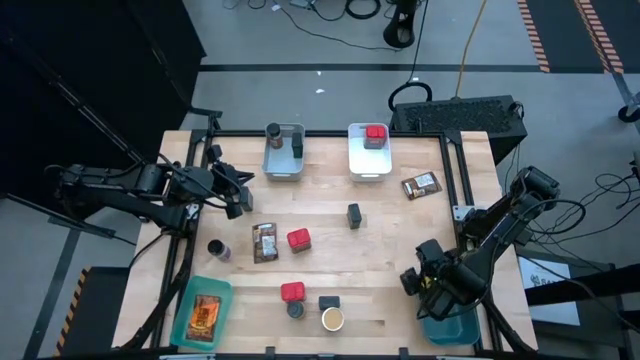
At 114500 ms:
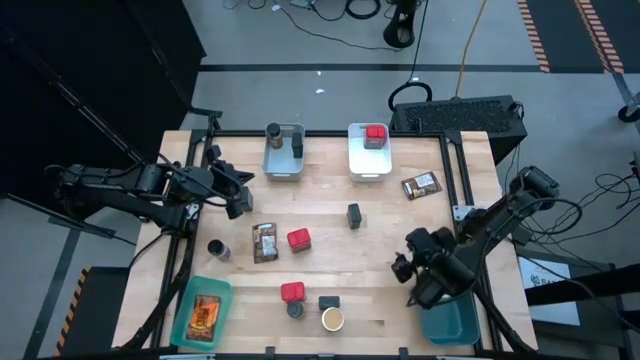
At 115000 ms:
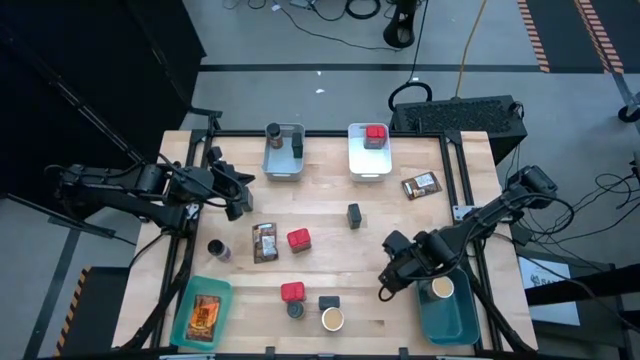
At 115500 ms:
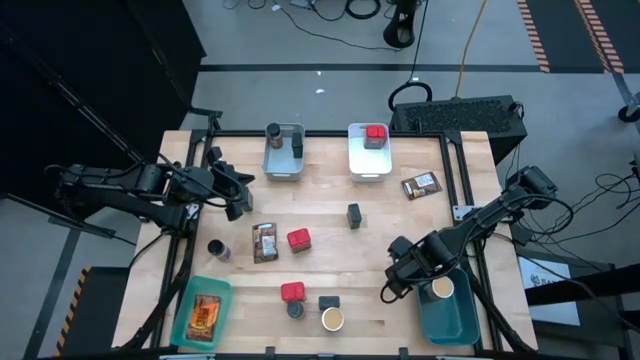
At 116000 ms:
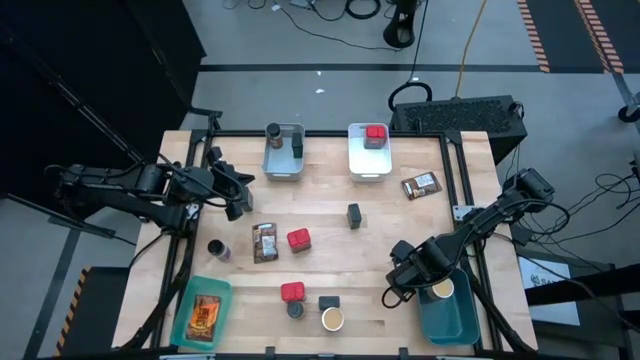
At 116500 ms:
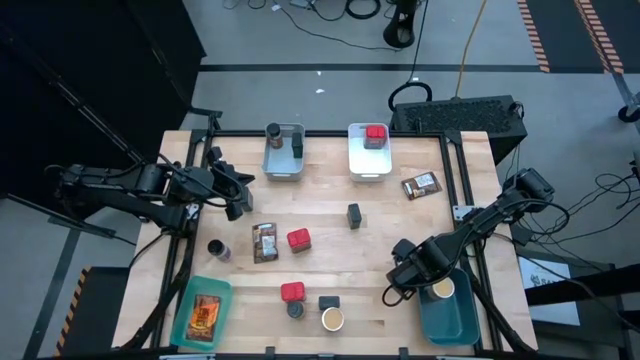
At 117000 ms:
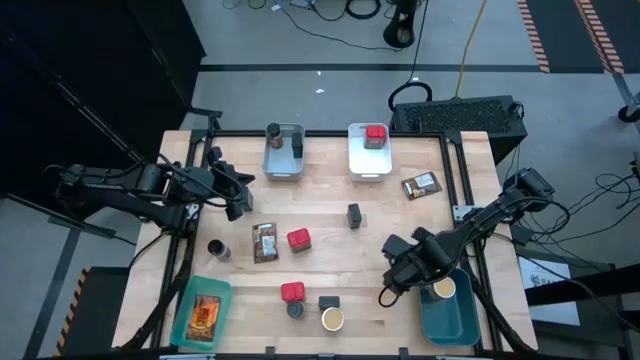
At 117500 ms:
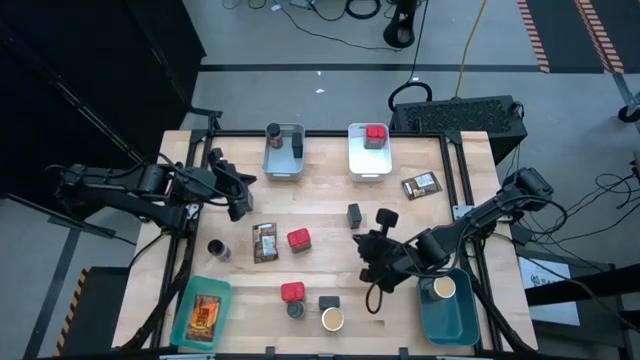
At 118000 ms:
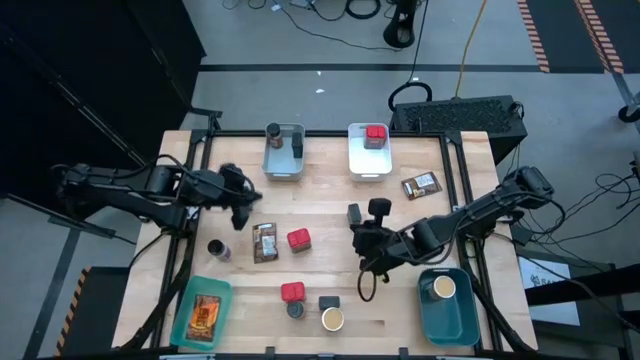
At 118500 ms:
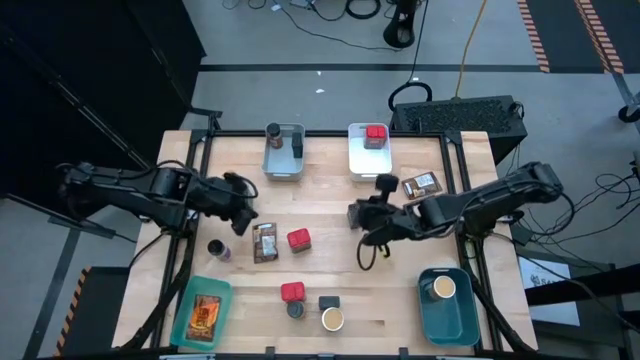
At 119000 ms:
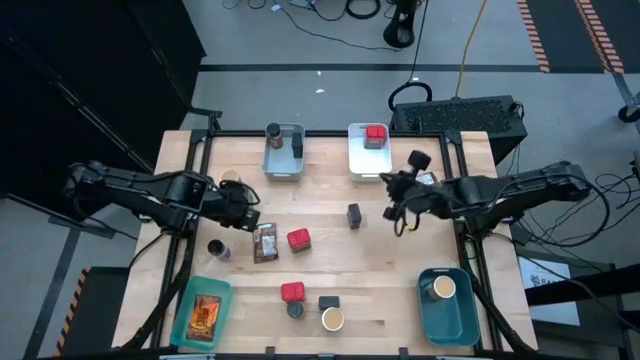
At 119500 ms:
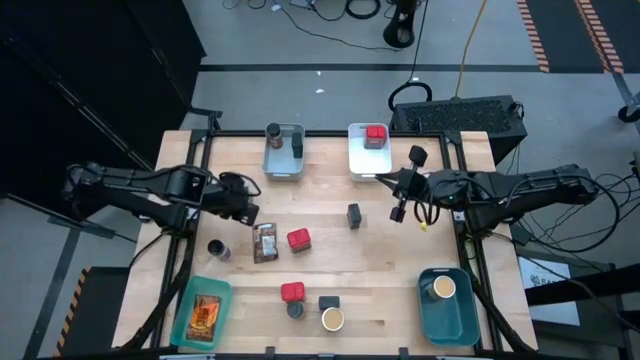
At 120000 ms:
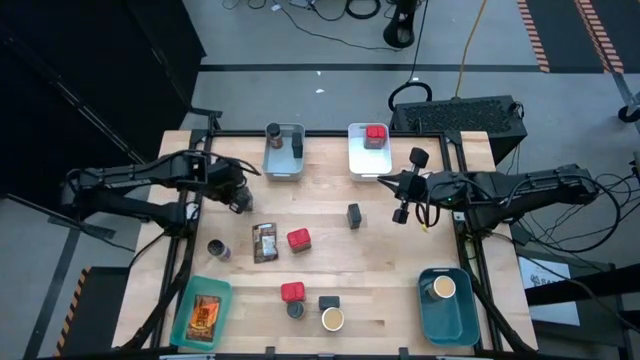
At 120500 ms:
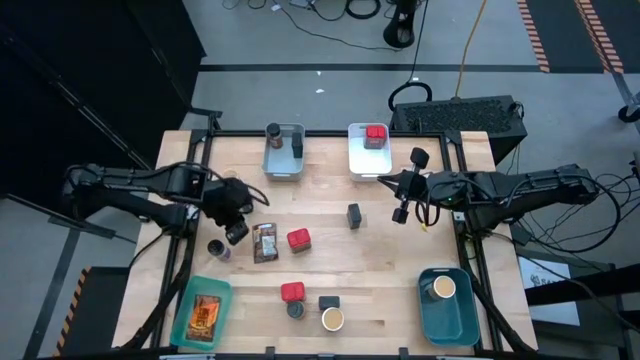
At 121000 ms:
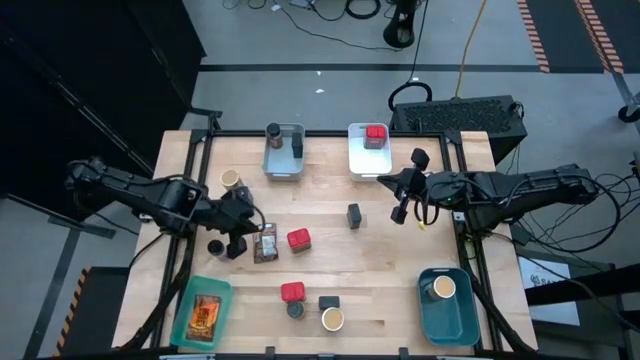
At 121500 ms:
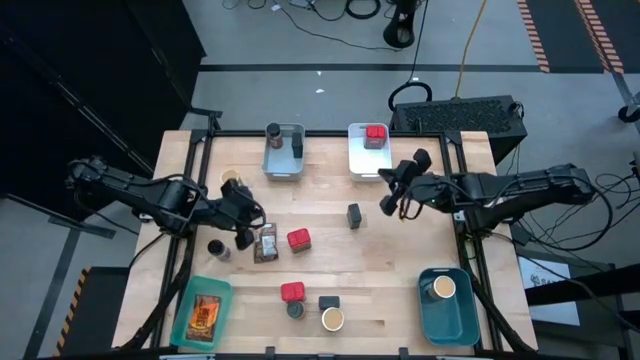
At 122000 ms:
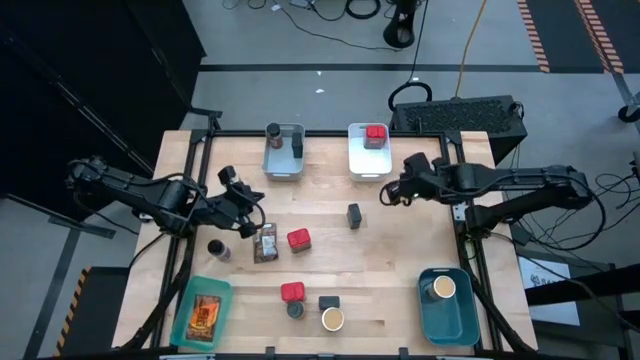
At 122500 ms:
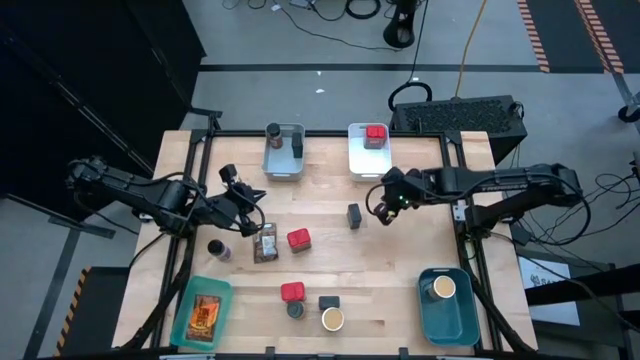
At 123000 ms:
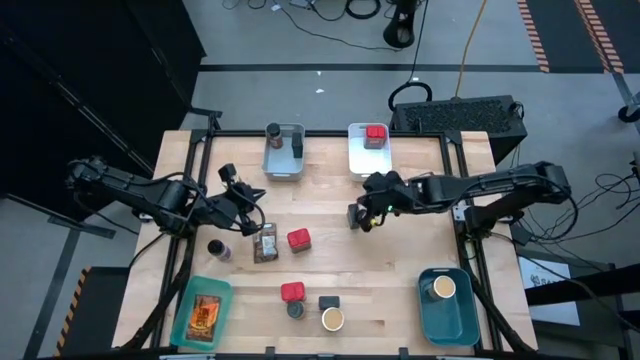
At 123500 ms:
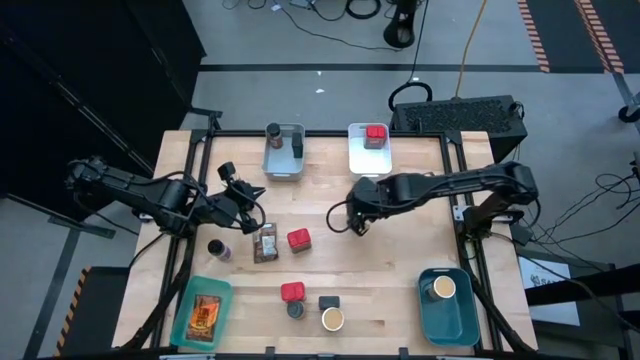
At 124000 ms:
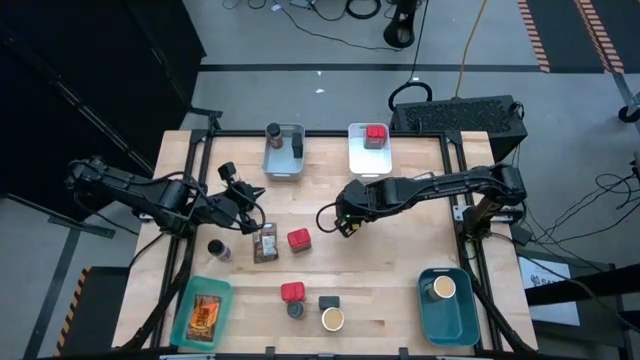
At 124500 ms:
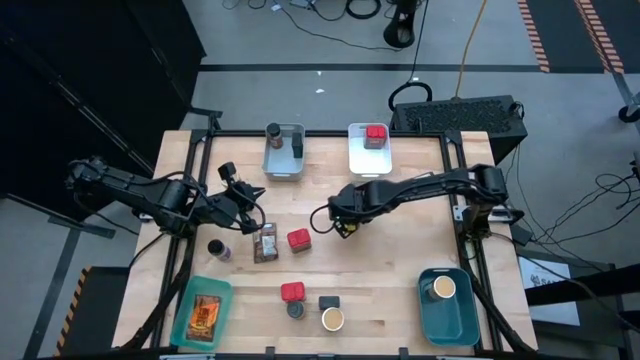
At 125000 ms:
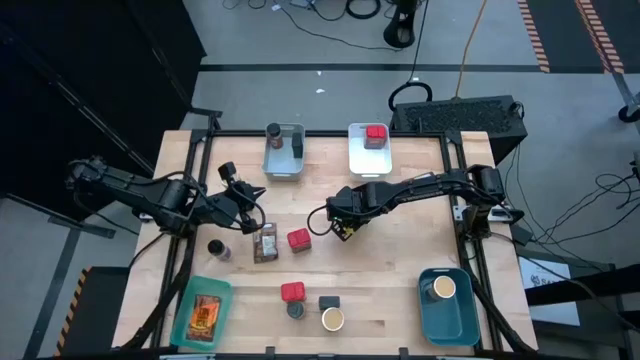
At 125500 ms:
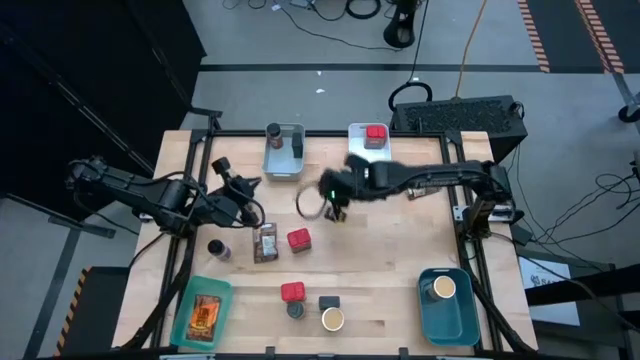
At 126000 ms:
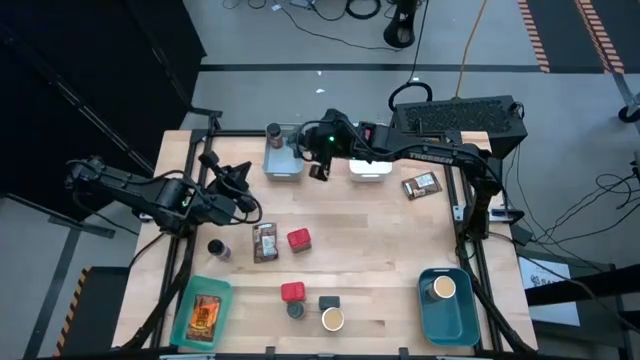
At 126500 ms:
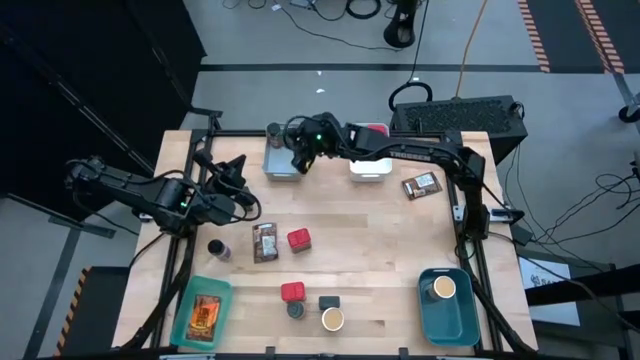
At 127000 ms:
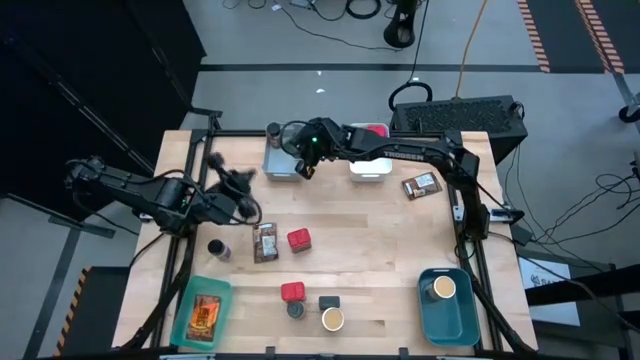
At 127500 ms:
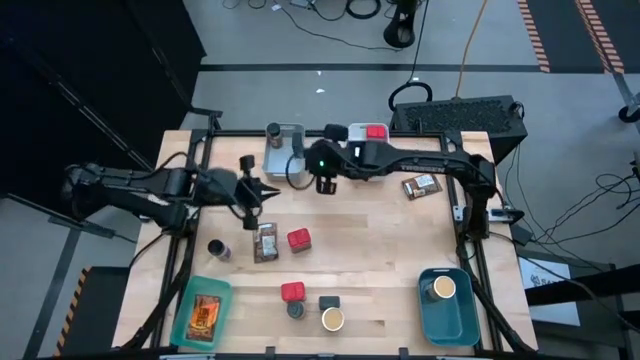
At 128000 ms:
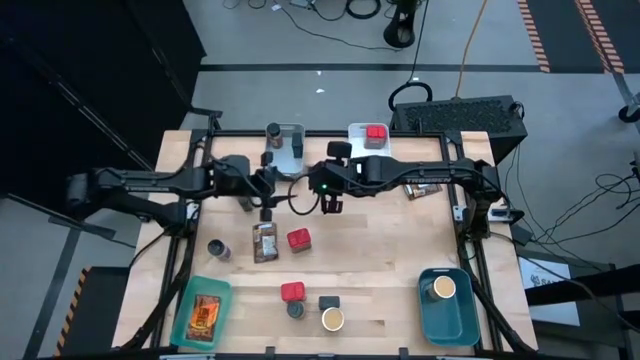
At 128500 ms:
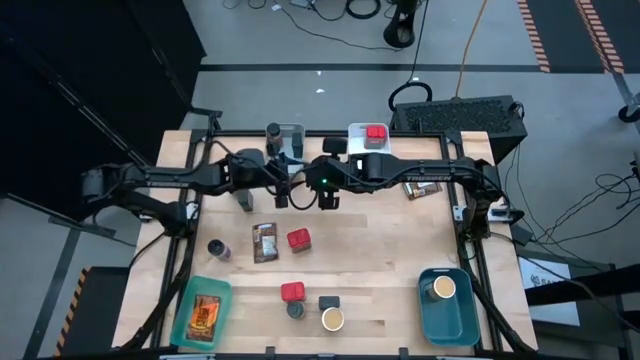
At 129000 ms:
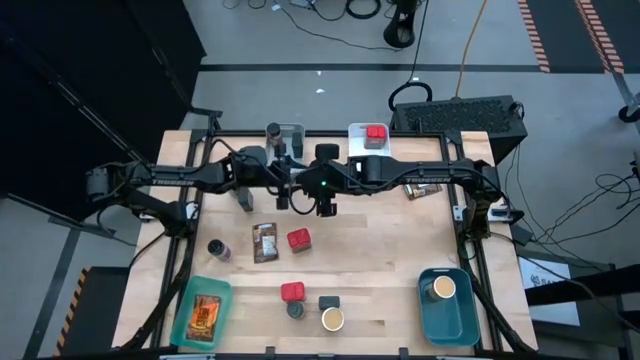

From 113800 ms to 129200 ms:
Task: Sort spices by type
Put the black spice can into the gray bin

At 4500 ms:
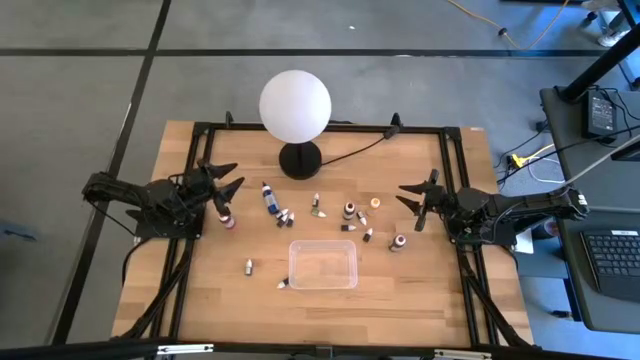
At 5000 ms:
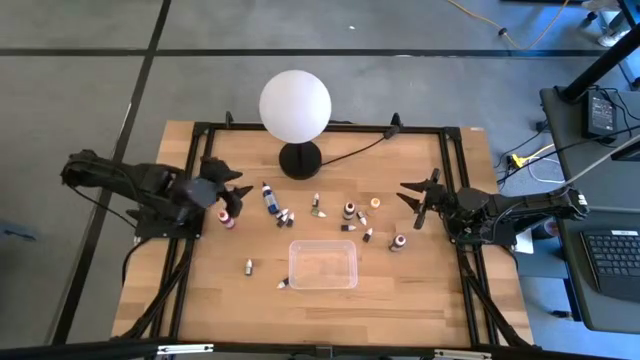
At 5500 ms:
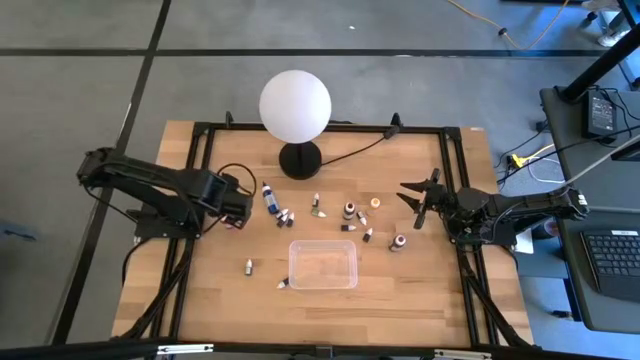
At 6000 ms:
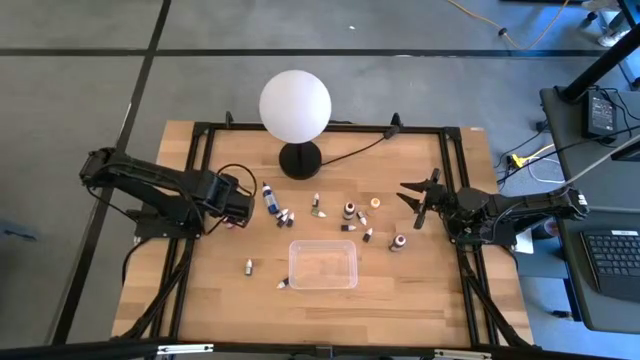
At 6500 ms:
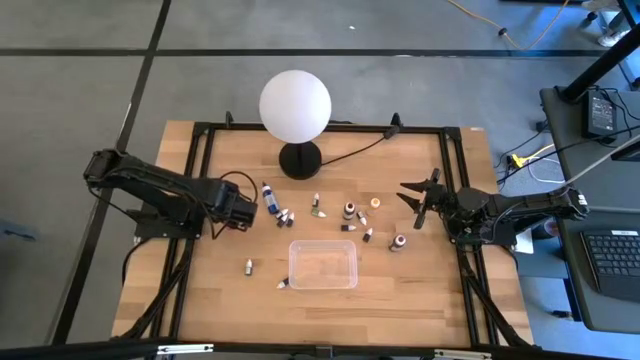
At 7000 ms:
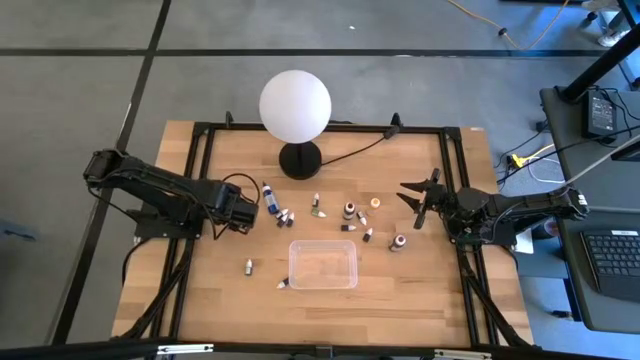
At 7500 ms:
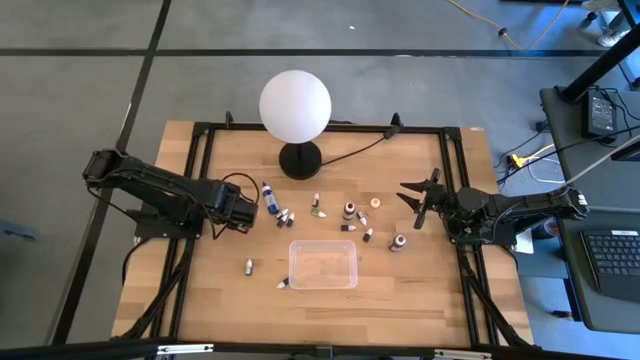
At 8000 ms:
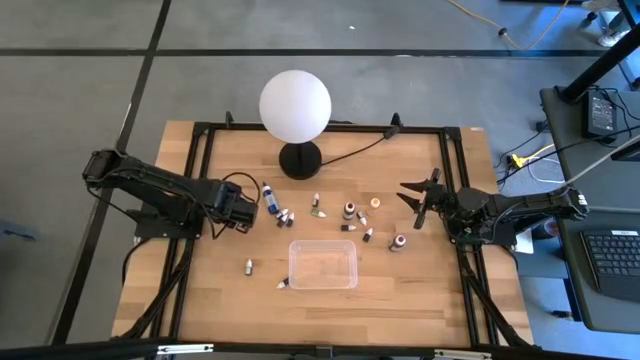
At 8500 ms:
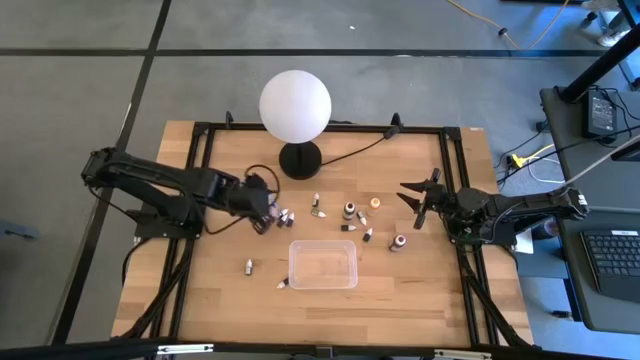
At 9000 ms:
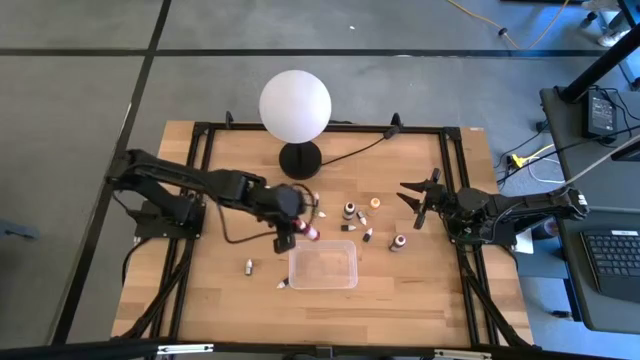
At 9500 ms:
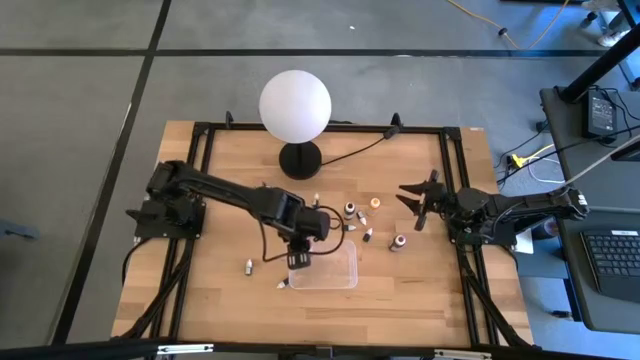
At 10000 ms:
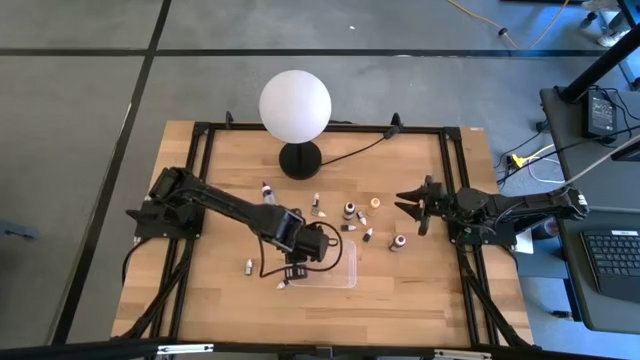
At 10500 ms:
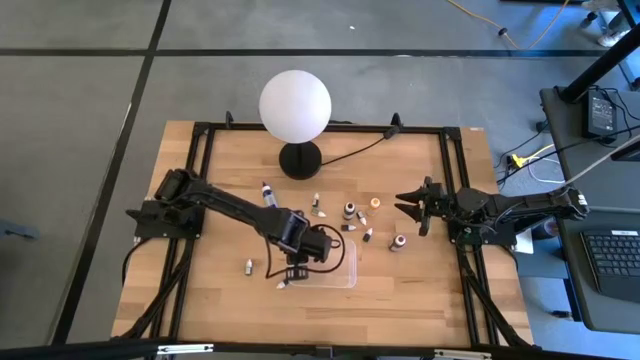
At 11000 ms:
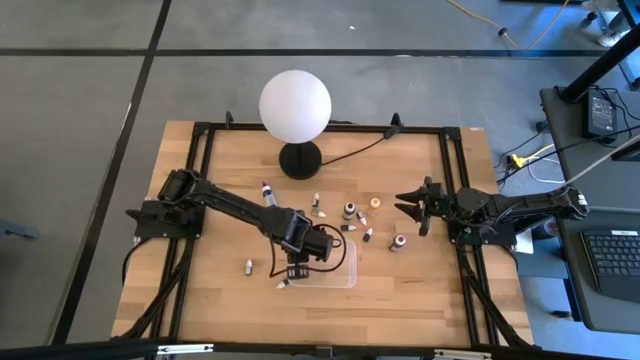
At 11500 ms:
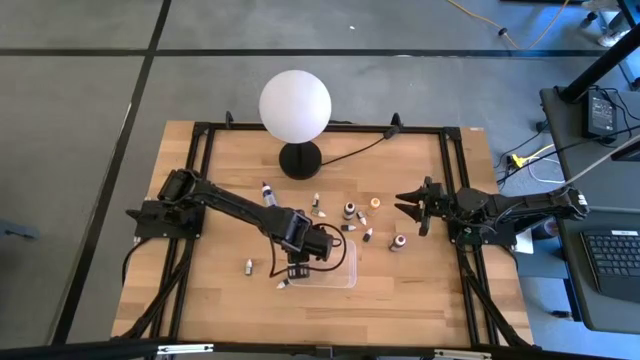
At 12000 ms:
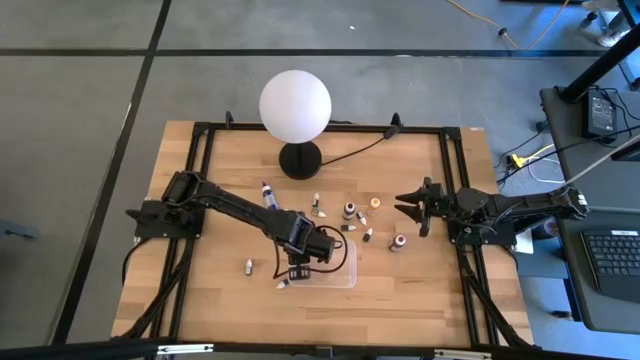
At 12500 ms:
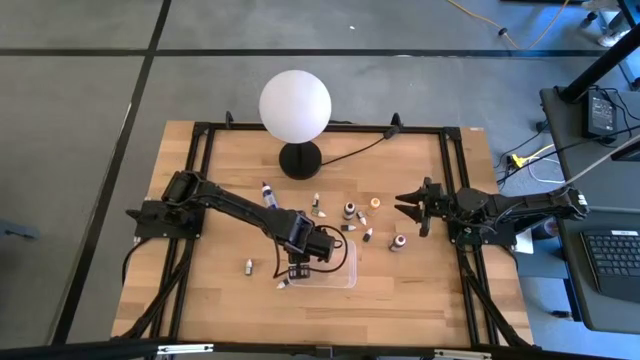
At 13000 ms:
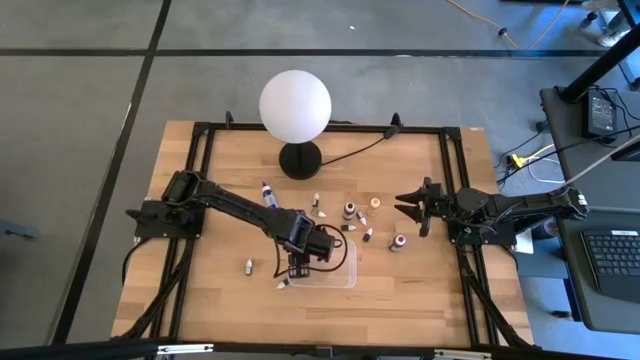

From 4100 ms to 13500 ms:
Task: Pick & Place food coloring
Put the large red food coloring bottle into the transparent bin
